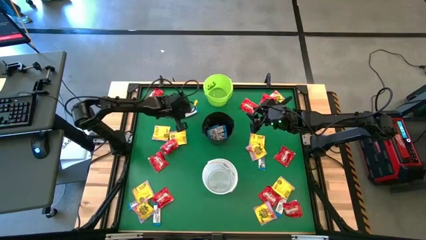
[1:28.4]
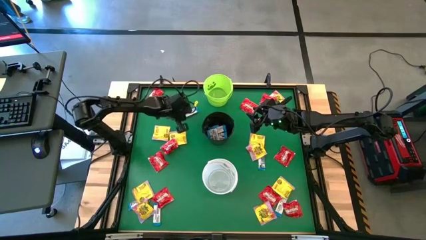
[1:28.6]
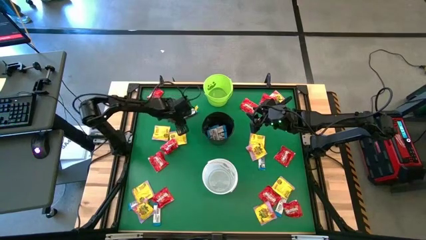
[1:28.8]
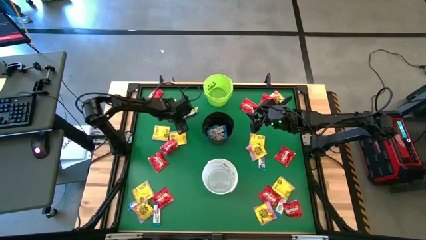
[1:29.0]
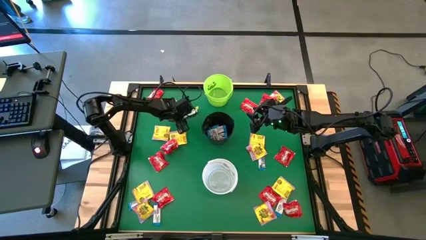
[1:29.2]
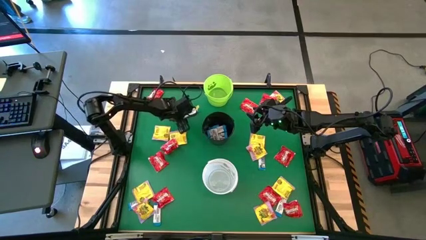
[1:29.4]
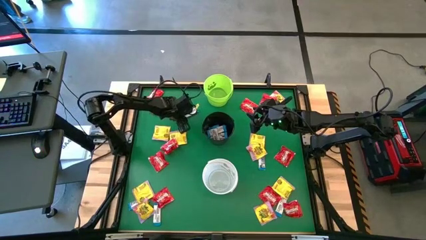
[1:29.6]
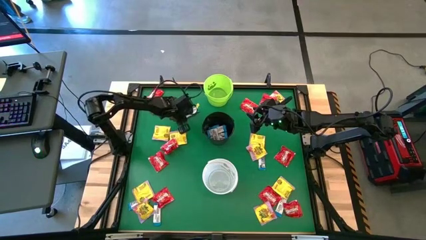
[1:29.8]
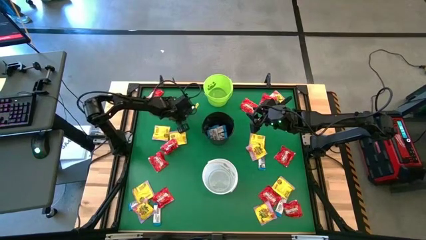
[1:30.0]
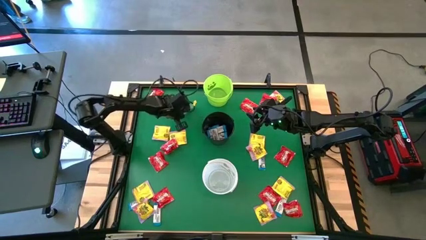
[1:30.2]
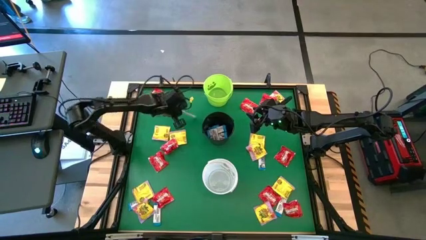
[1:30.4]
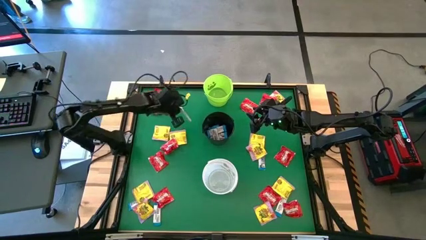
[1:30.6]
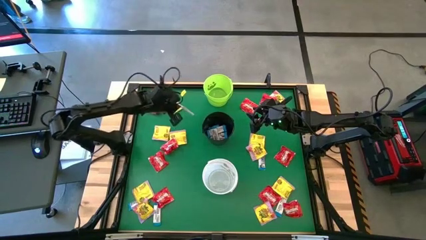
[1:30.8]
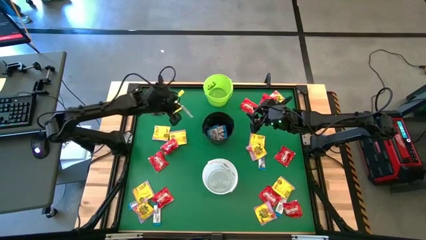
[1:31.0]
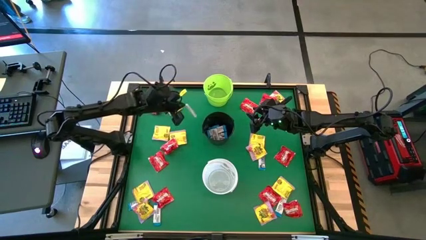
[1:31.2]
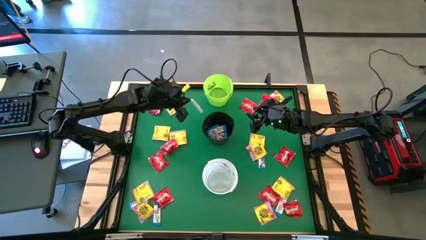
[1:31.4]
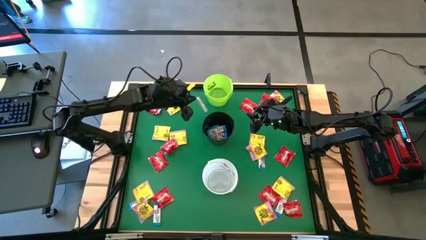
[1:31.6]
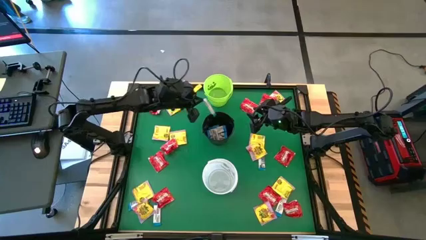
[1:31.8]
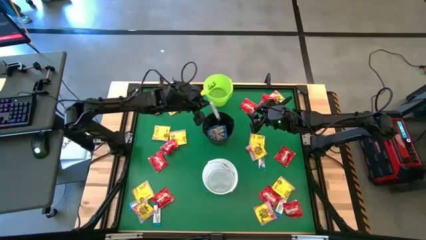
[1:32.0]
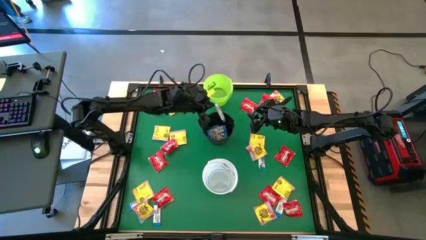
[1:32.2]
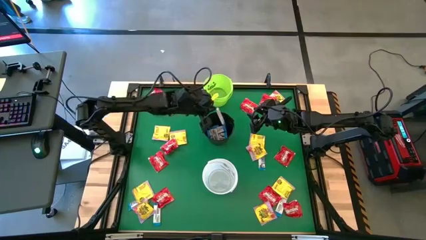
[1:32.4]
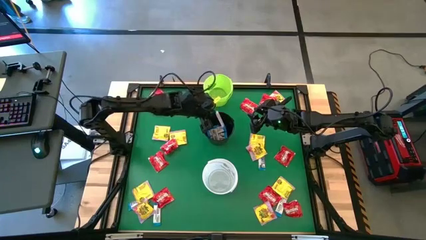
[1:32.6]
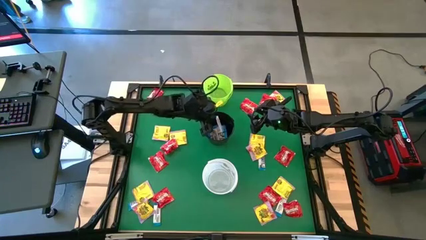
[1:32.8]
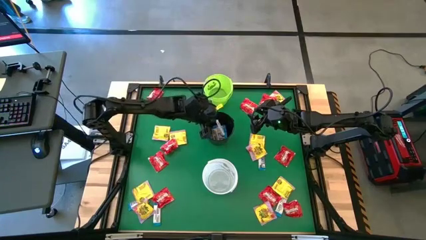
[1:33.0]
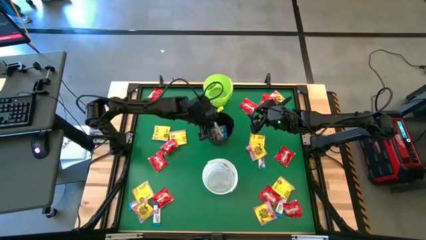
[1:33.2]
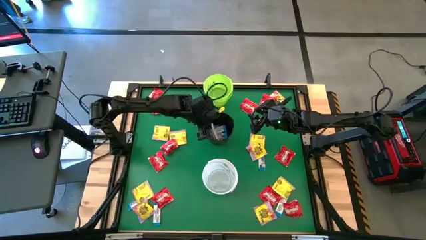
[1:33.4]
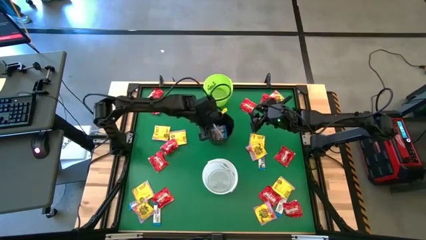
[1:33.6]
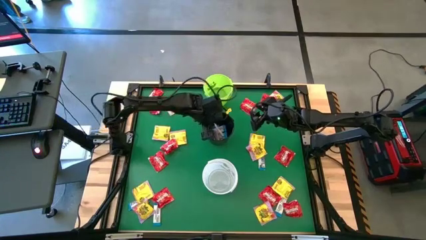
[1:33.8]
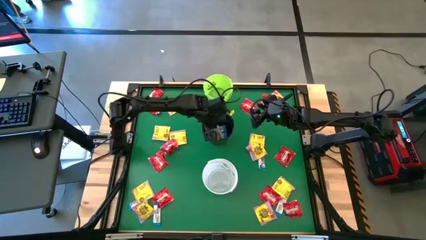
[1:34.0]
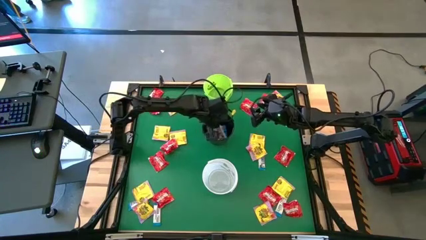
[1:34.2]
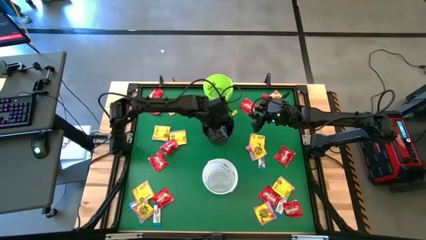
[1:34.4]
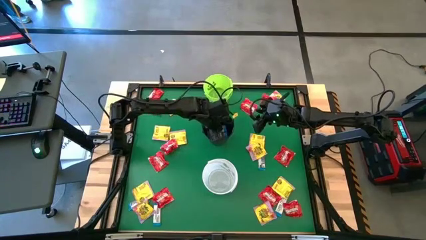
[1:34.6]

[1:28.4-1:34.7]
Task: Sort candy by brand, put in halloween buckets
Put the white chocolate into the black bucket

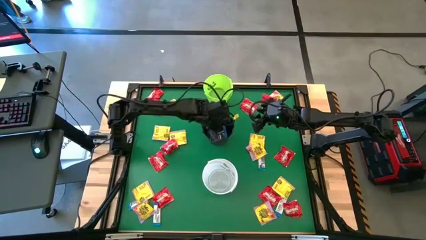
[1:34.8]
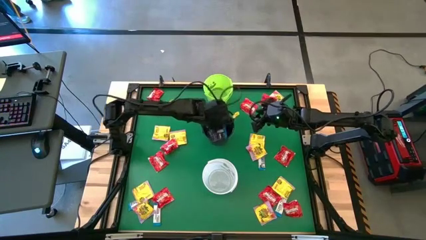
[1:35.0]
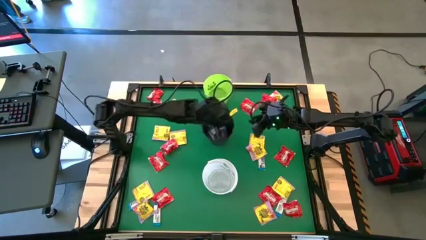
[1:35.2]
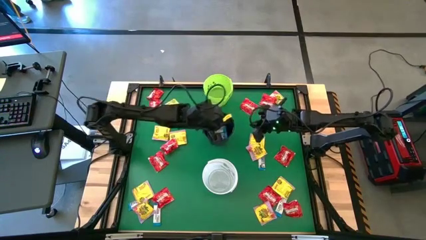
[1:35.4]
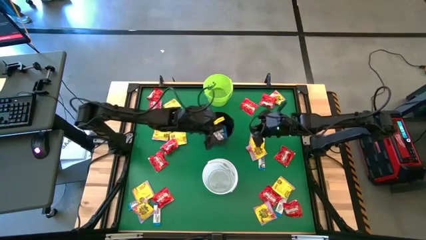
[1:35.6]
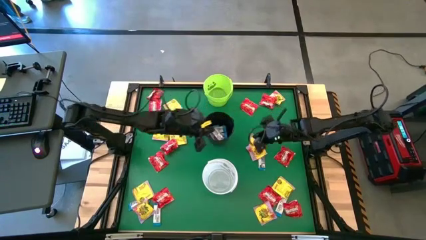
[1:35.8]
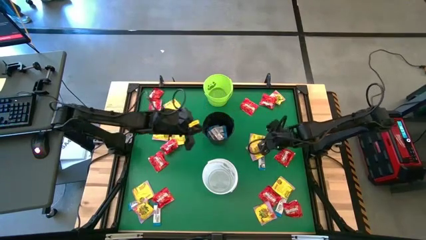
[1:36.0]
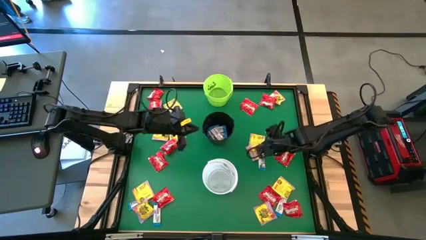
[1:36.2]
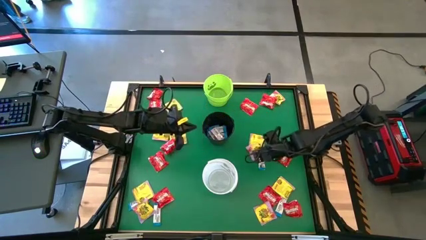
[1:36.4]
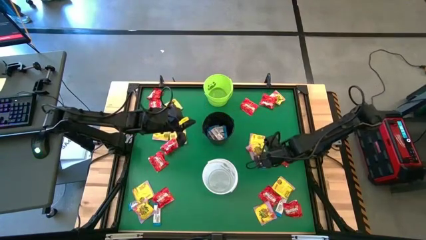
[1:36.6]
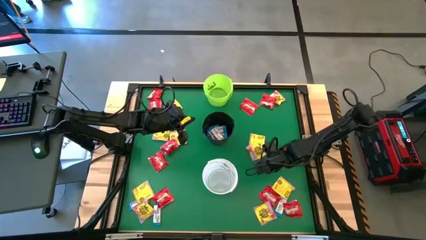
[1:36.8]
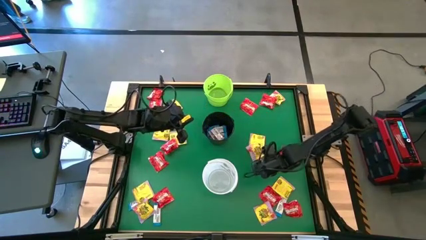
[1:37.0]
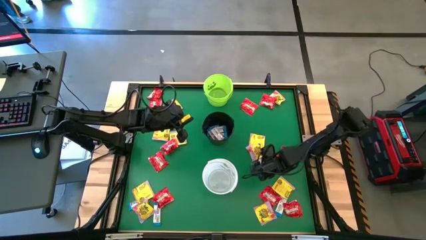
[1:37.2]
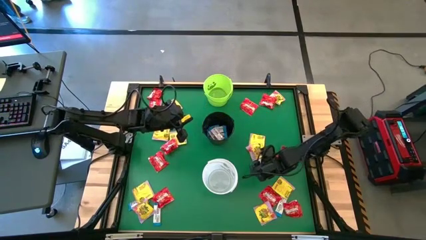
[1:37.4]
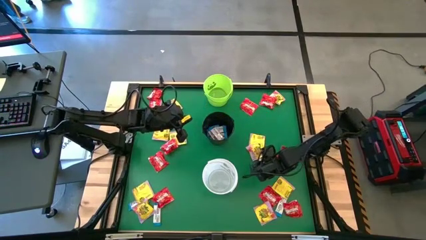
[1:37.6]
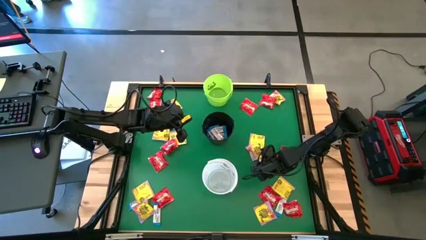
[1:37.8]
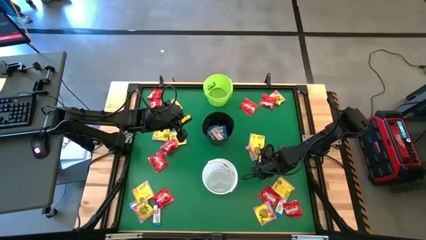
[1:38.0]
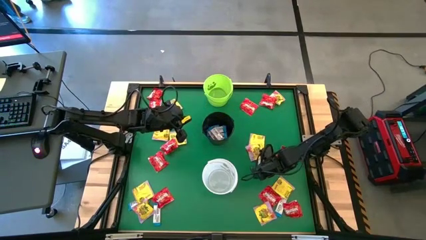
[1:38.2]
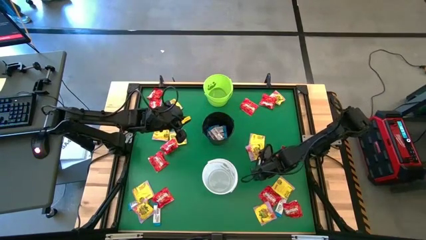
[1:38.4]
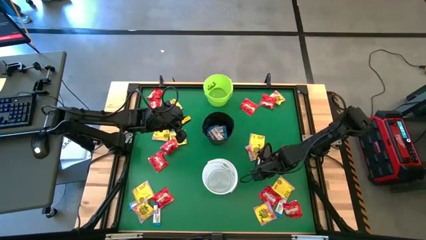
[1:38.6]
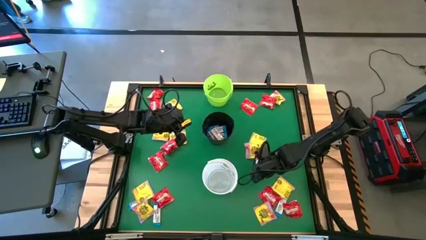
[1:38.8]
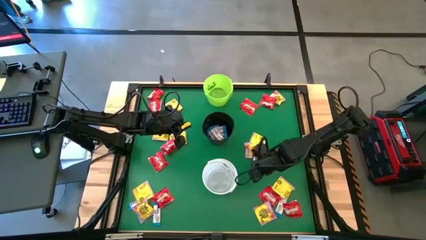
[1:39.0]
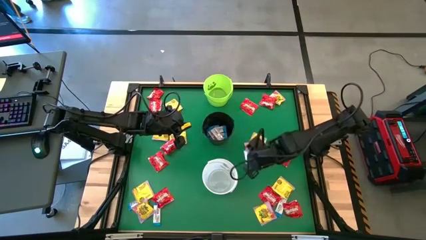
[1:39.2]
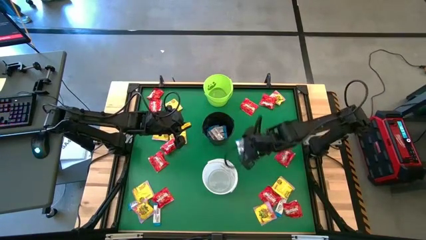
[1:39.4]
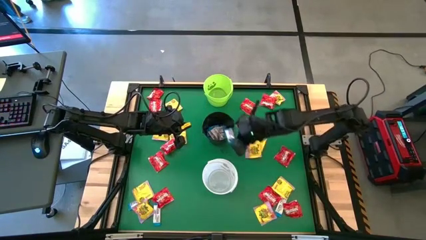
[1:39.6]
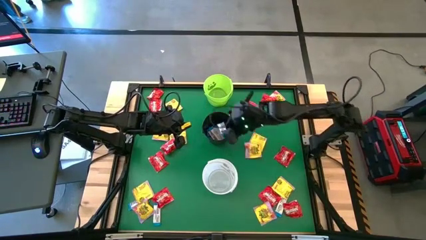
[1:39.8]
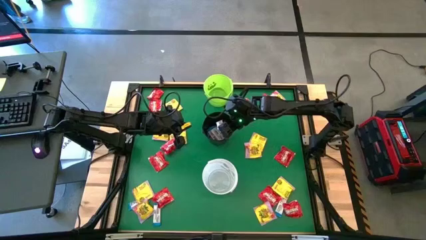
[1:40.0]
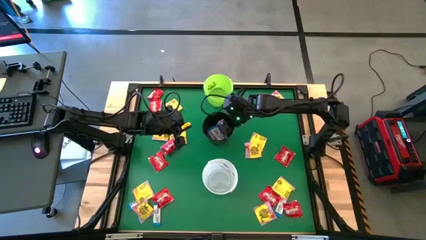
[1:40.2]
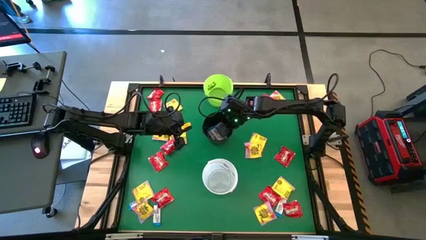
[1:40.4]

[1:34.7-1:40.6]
Put the white chocolate into the black bucket

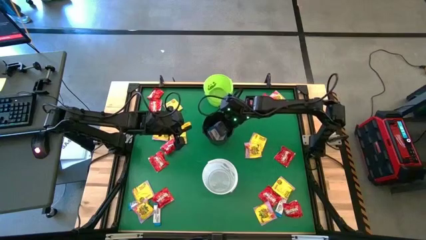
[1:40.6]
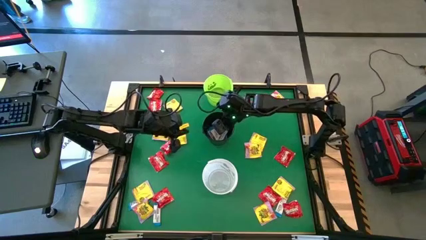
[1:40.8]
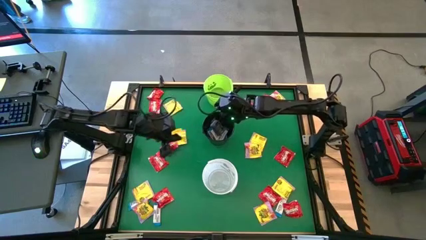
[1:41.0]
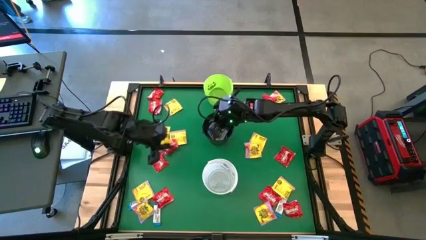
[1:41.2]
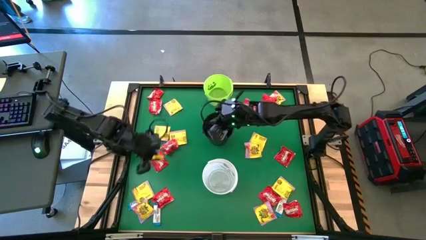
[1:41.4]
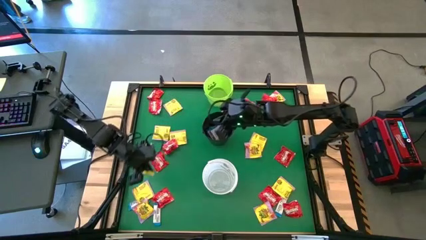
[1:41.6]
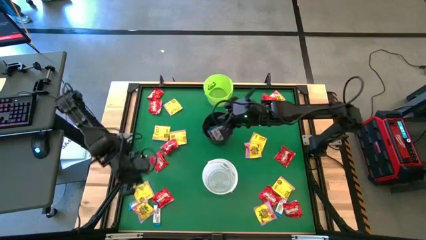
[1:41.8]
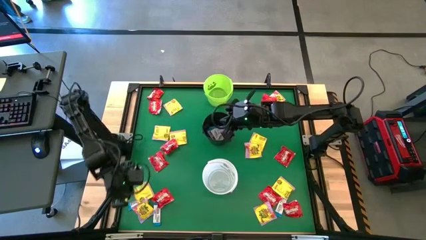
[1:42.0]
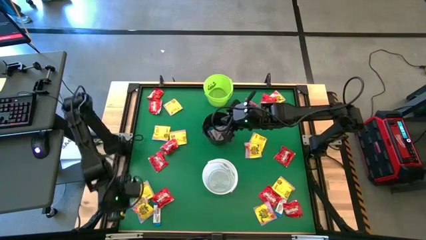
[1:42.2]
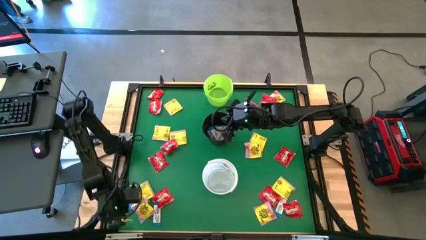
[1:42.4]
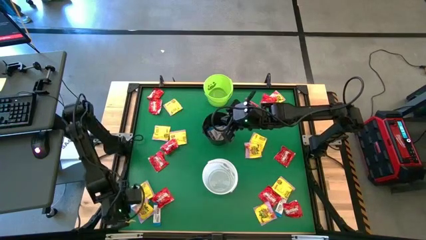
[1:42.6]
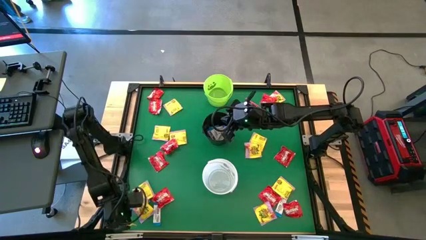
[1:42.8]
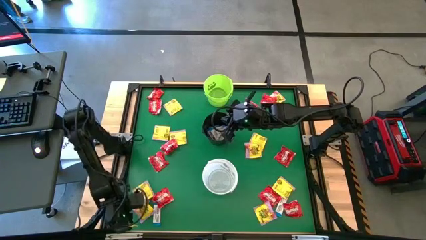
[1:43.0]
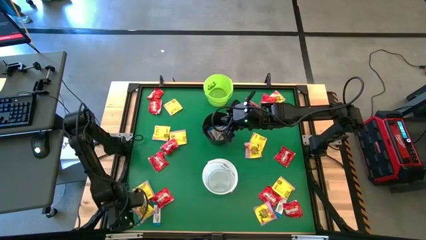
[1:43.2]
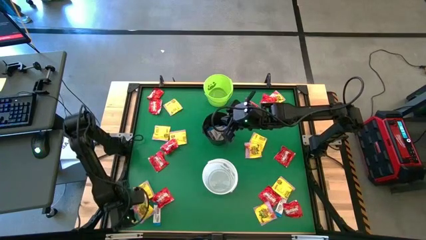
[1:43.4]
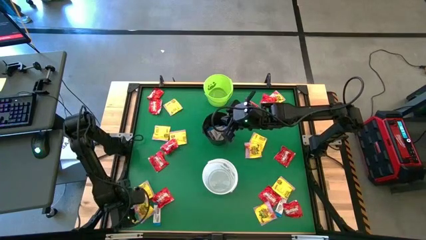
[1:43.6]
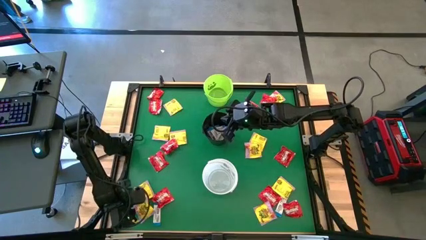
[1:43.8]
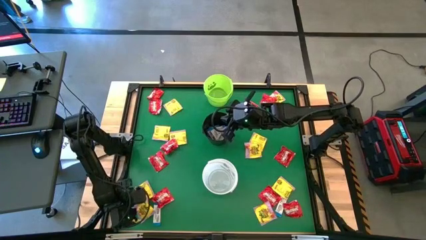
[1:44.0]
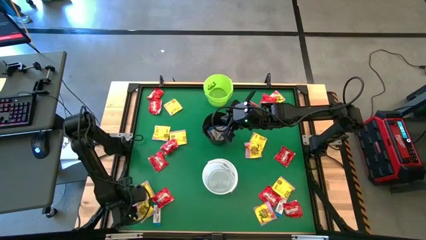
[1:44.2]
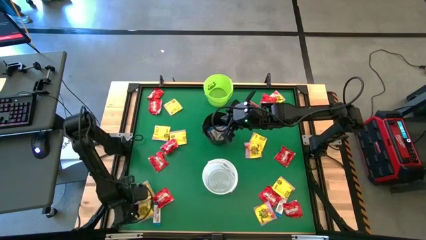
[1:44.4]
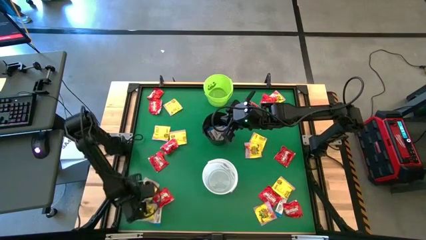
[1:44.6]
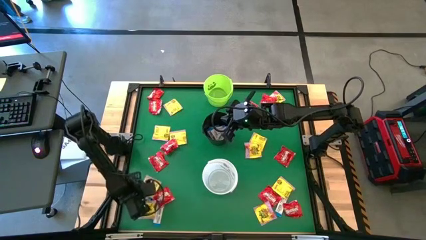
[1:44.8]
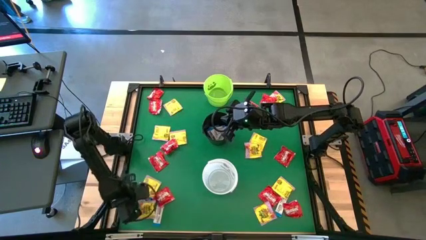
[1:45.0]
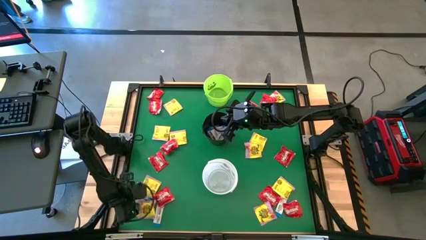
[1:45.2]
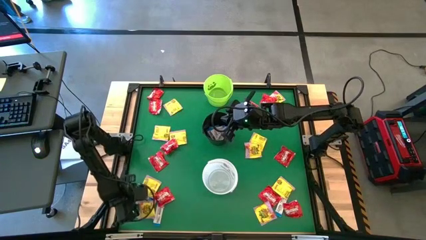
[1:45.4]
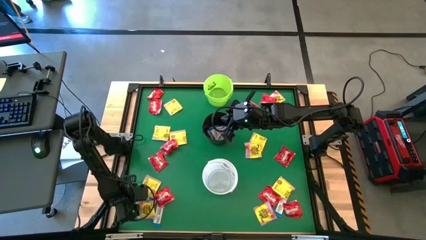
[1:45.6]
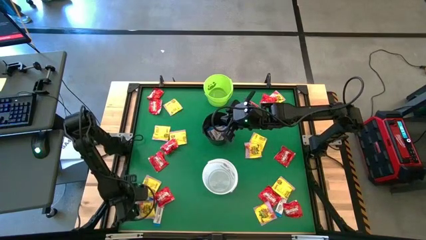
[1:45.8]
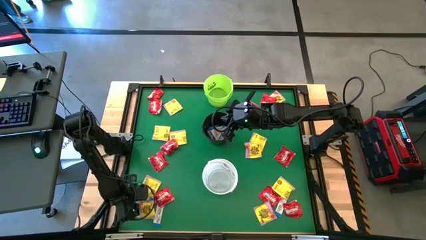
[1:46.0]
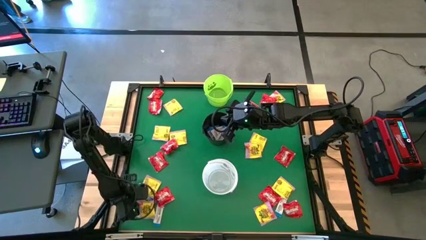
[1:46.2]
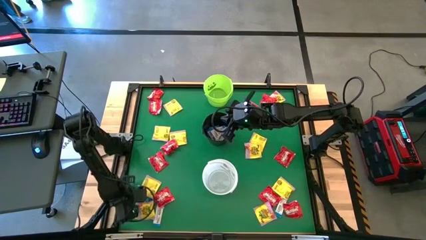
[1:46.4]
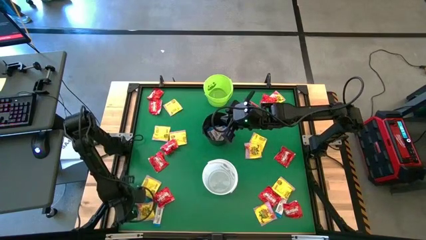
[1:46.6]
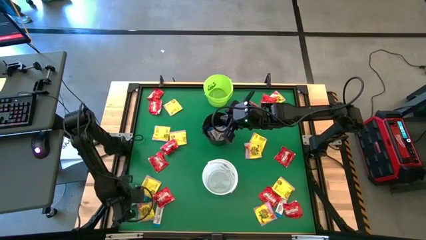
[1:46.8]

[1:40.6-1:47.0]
Put the white chocolate into the black bucket
